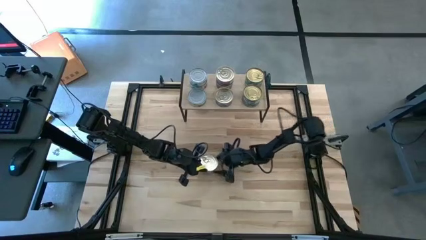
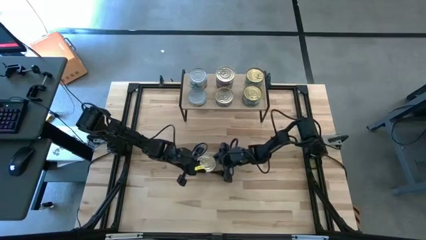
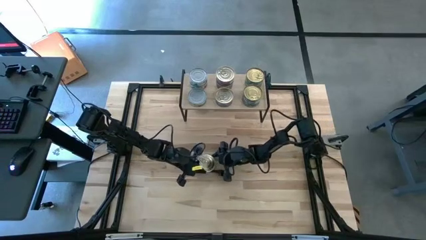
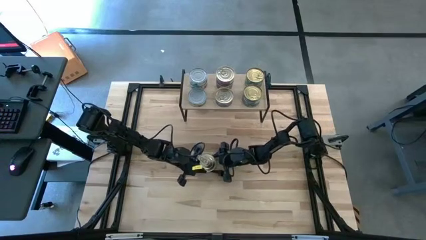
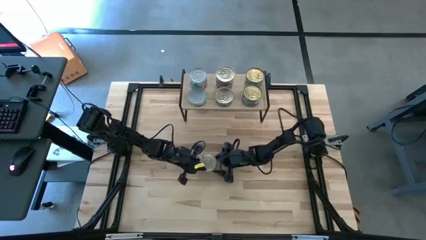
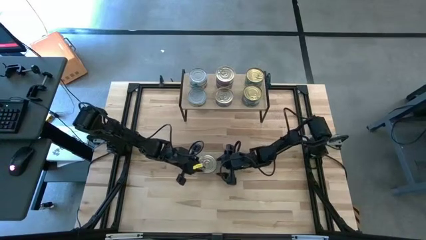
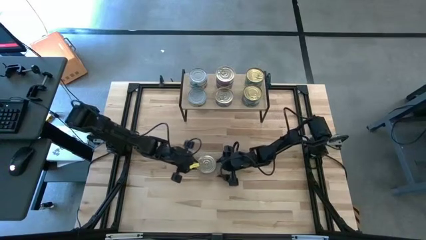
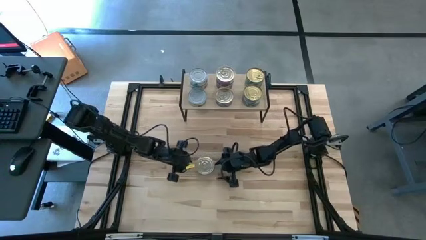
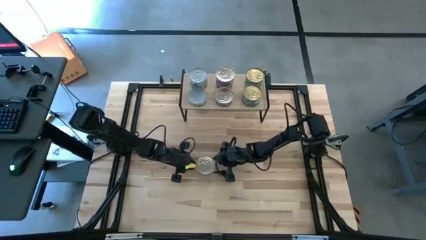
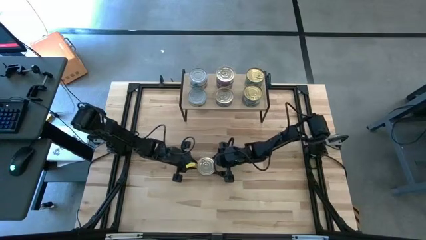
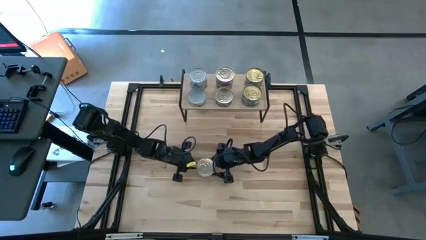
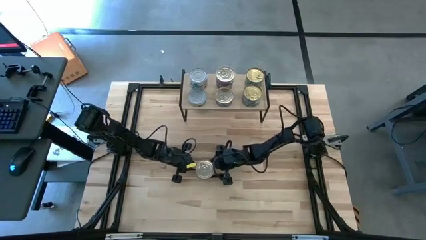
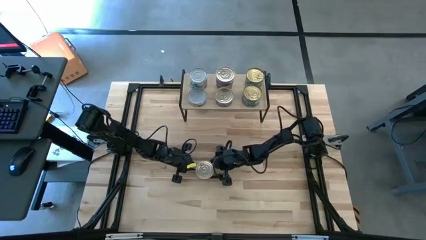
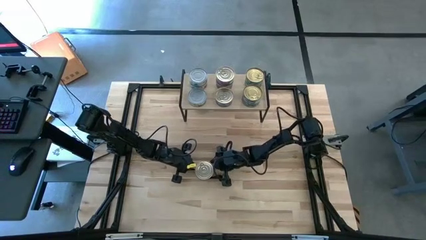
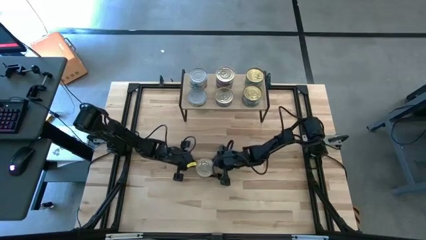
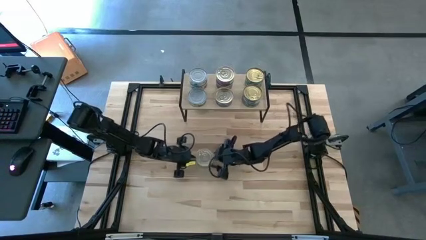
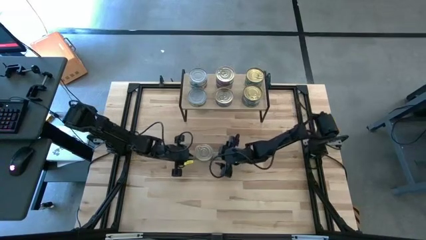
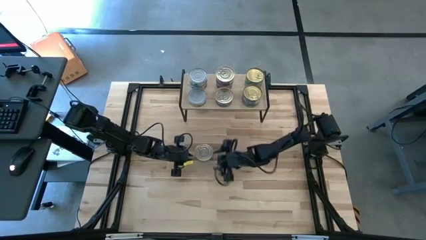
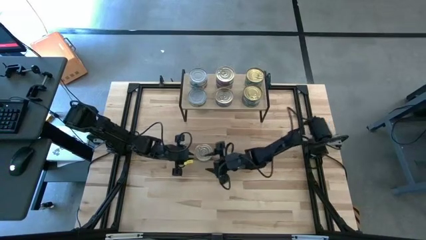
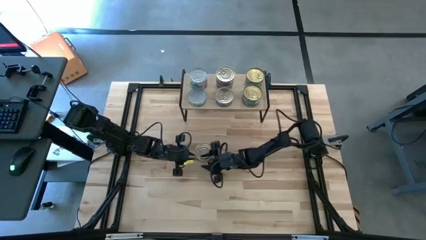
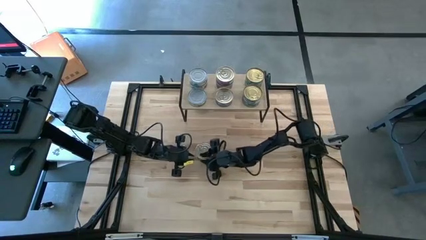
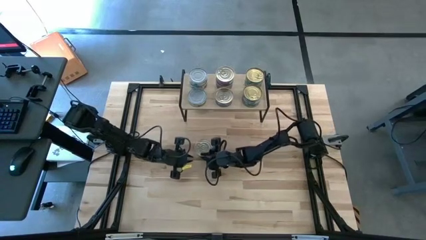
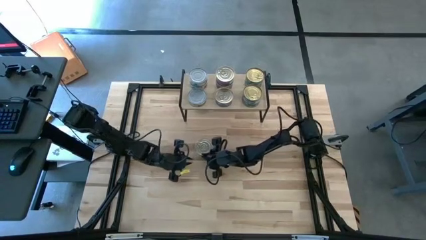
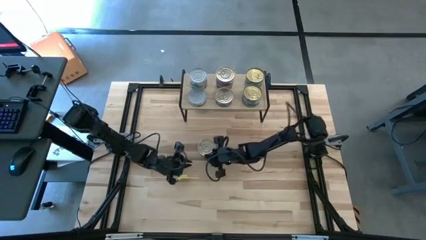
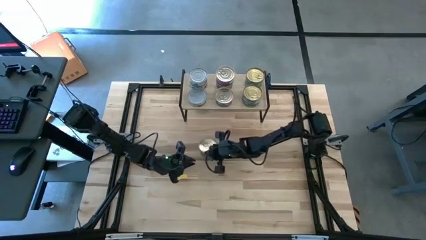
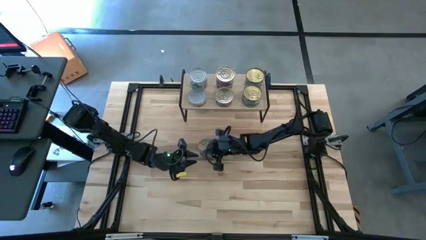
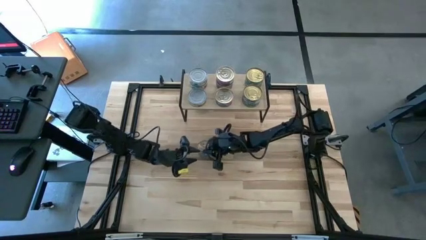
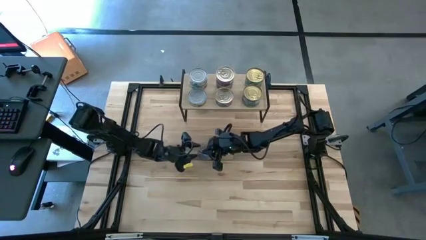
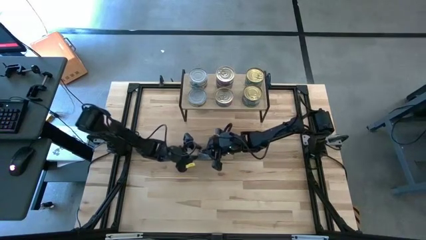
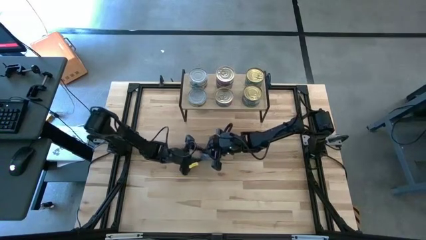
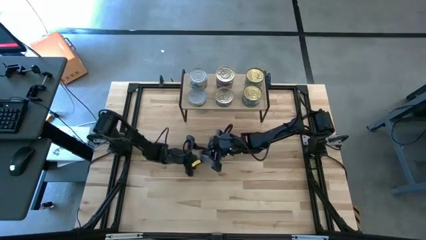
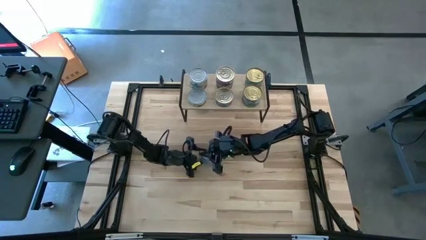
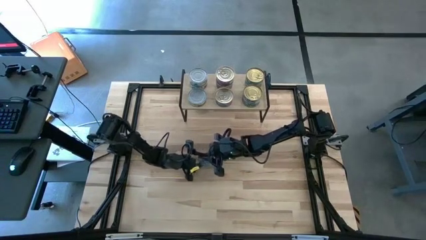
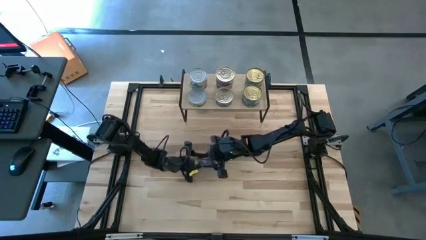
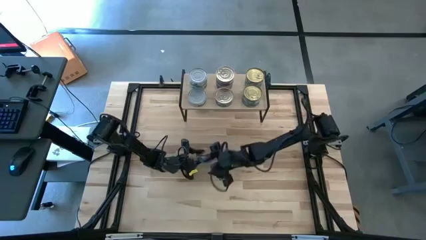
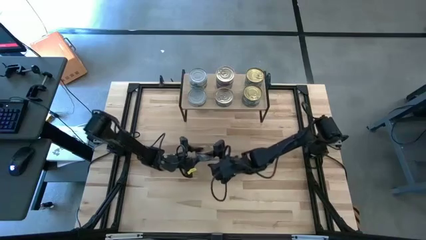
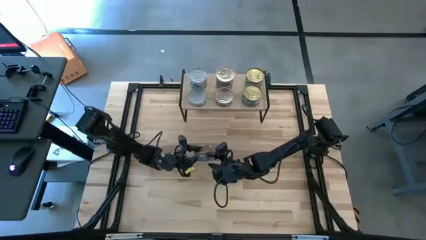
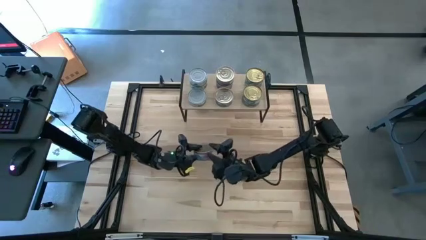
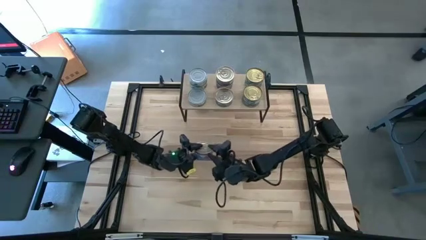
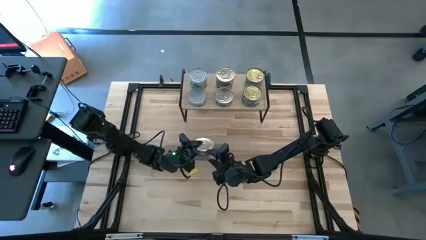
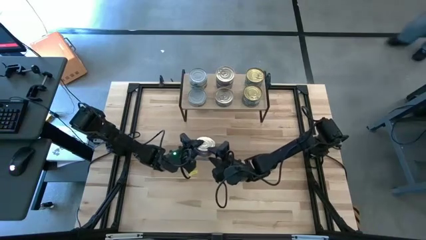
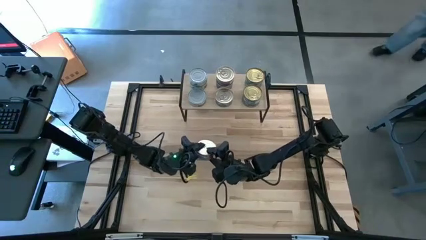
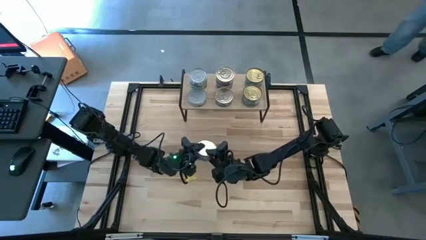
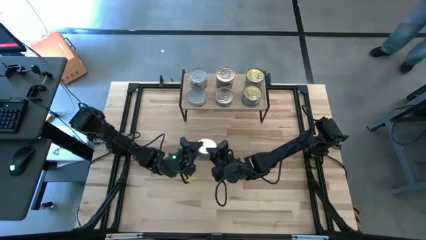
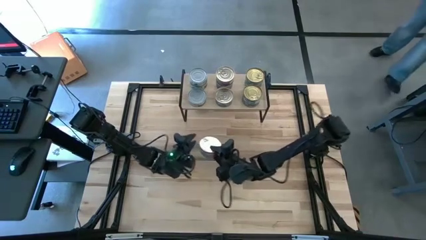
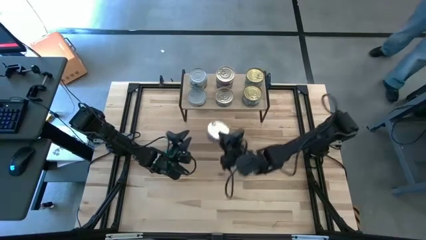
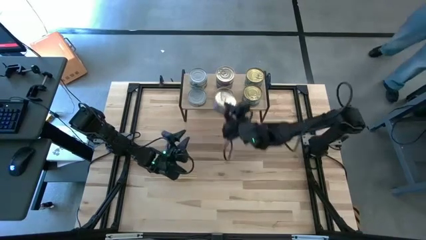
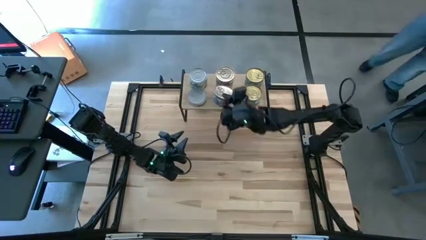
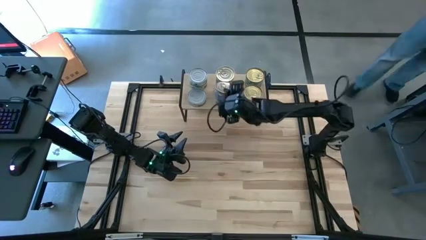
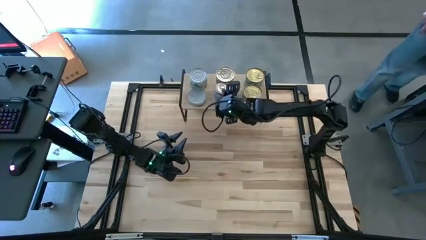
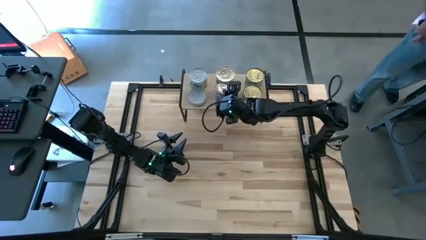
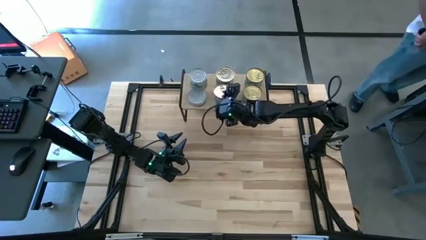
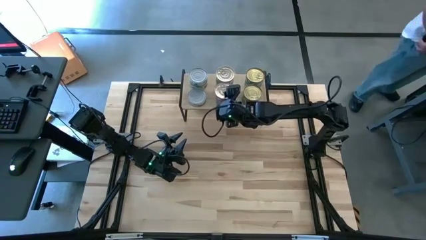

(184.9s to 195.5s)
Task: Stack canned seafood by type on shelf
Stack the blue tuna can on top of the other blue tuna can on the shelf

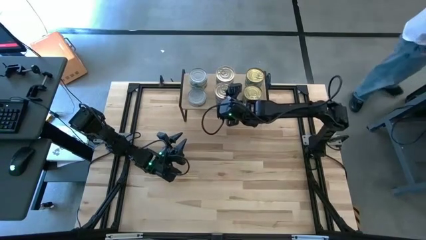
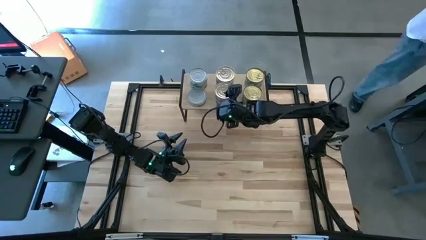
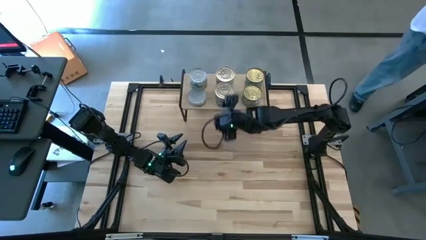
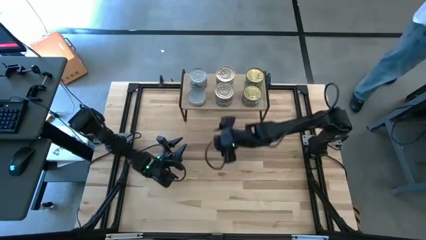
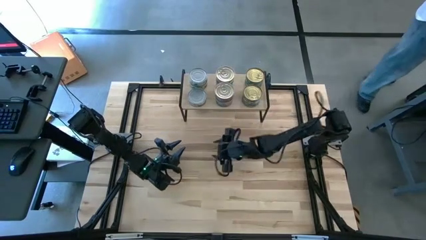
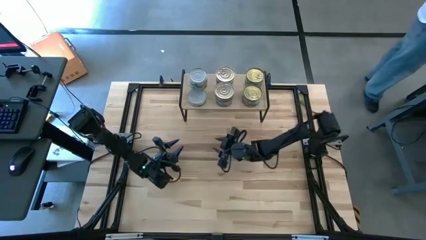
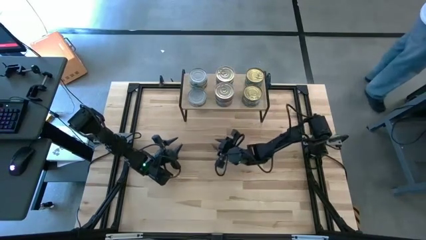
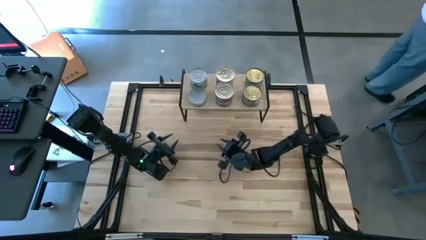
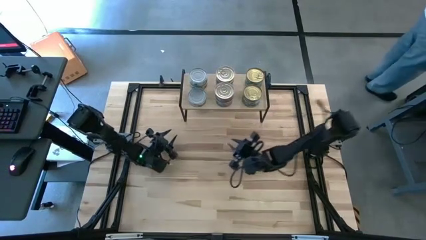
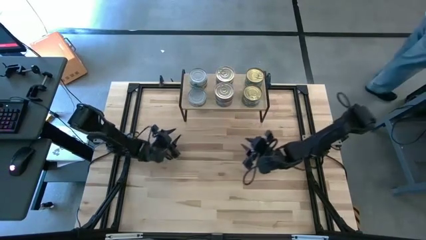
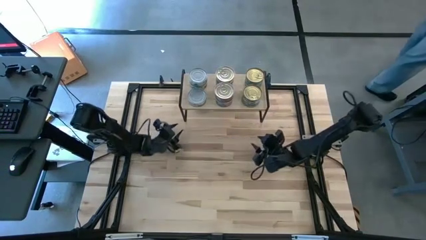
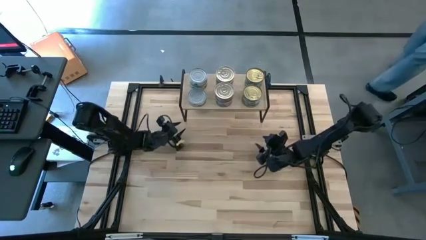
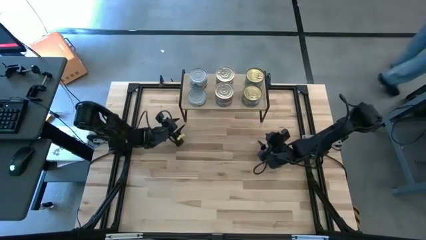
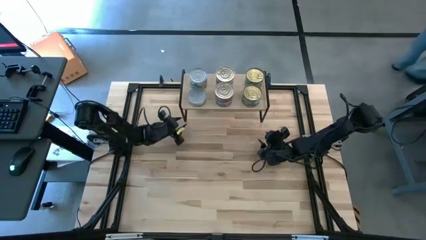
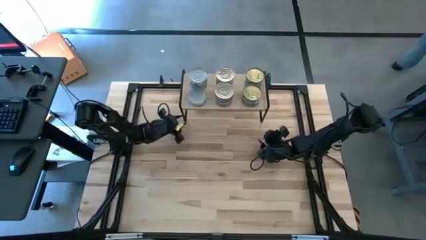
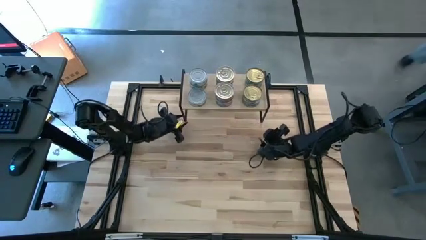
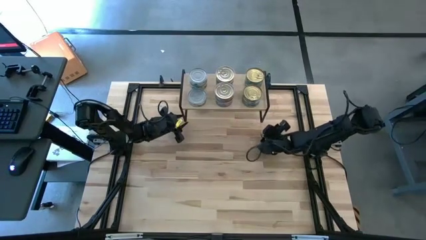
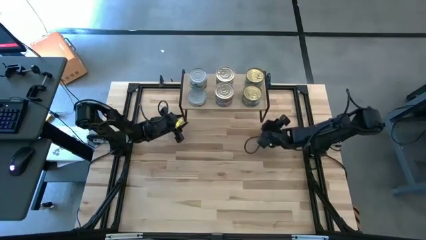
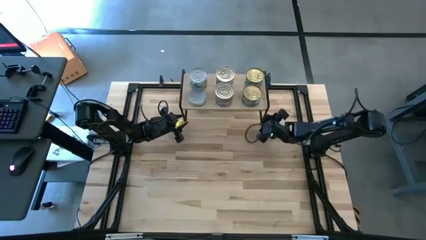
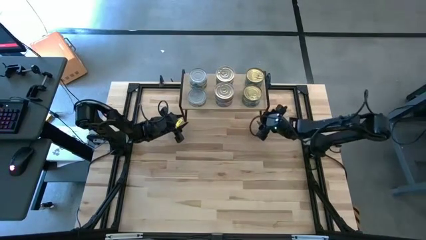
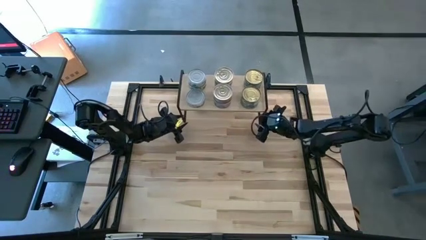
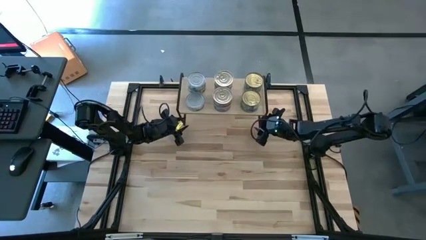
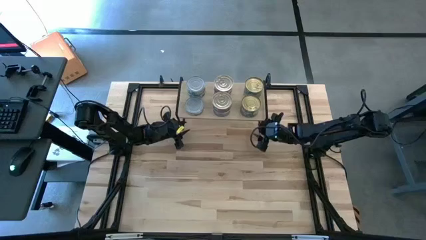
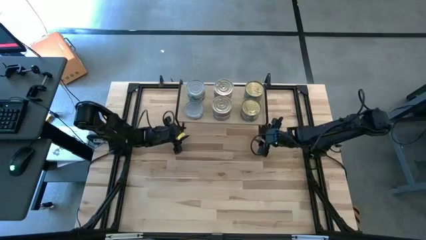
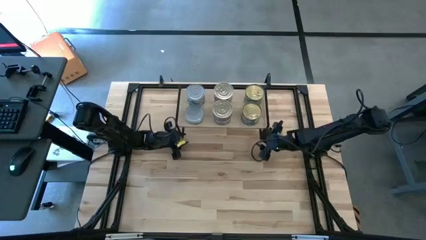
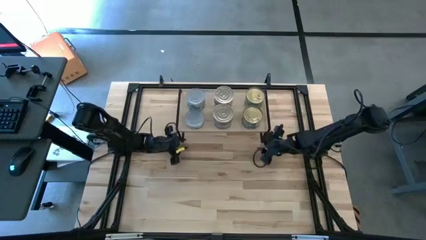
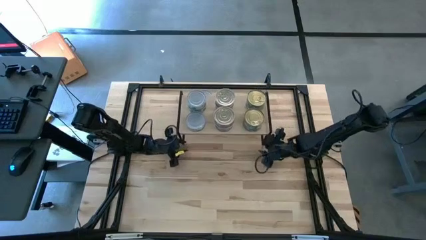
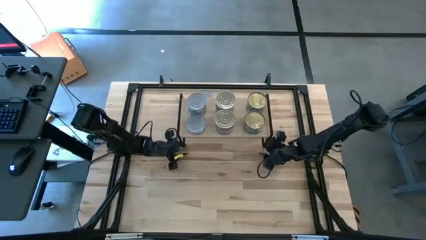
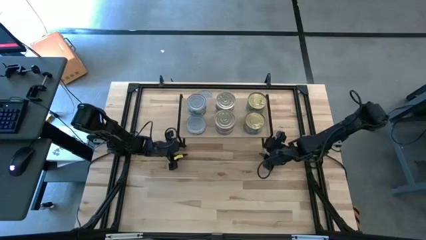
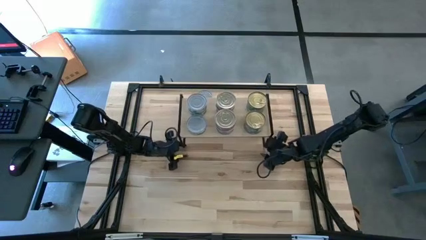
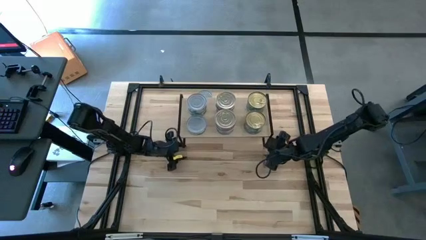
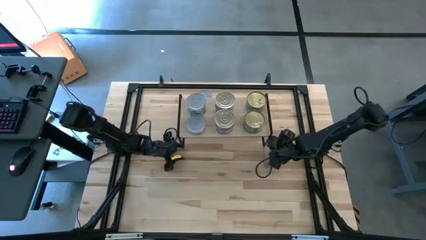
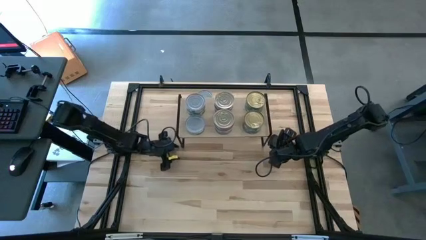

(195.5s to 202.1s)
Adjust the shelf
